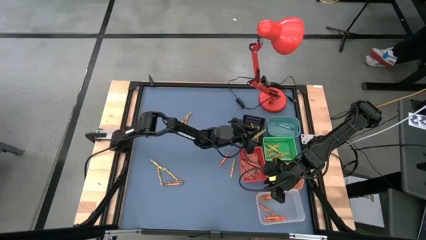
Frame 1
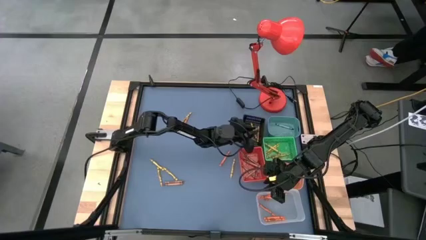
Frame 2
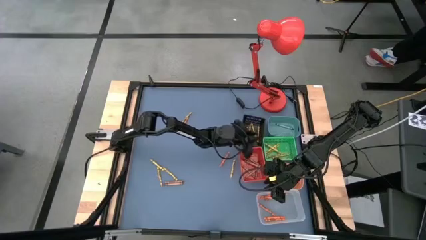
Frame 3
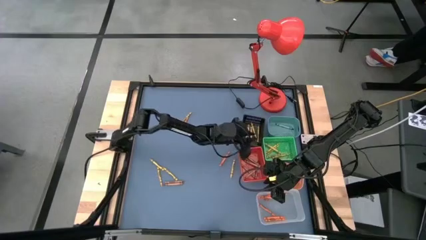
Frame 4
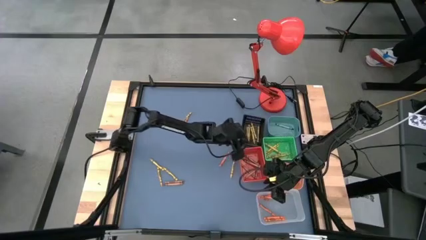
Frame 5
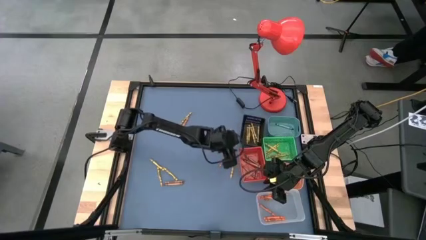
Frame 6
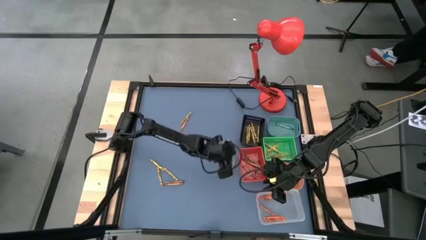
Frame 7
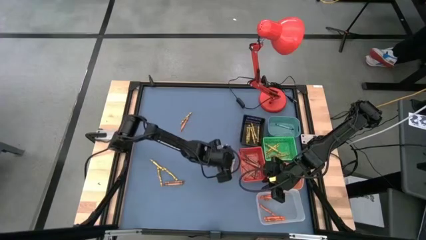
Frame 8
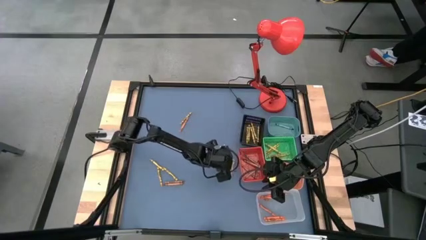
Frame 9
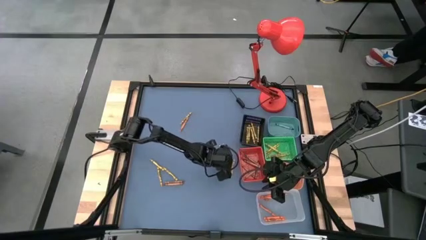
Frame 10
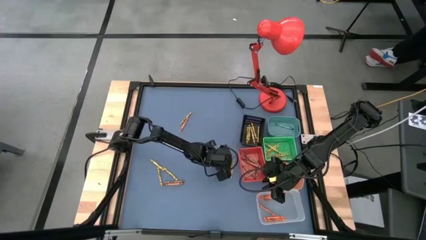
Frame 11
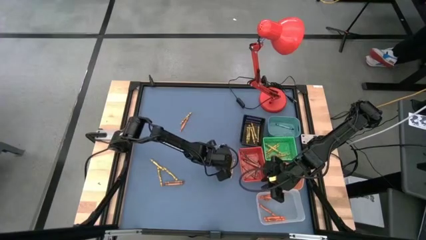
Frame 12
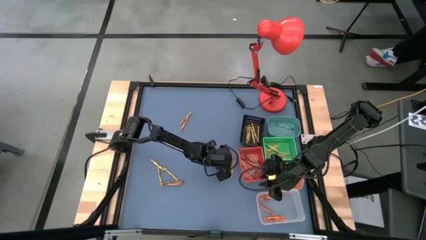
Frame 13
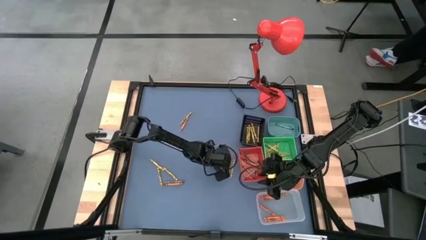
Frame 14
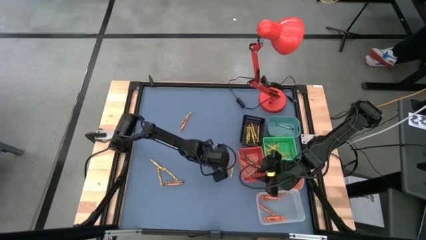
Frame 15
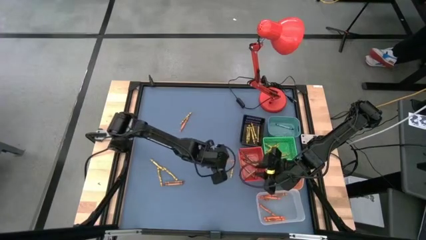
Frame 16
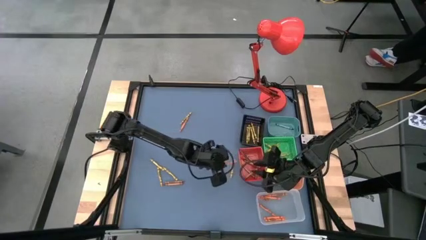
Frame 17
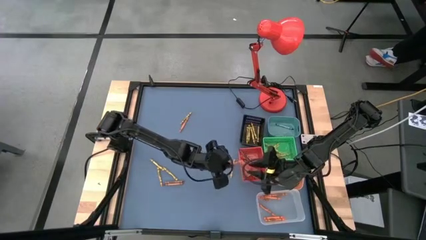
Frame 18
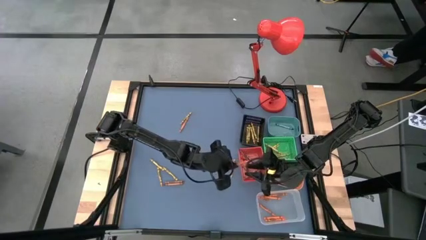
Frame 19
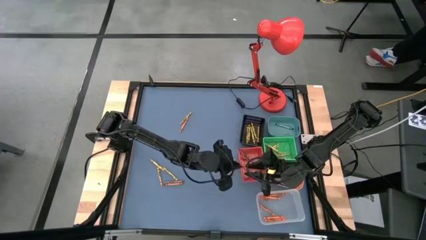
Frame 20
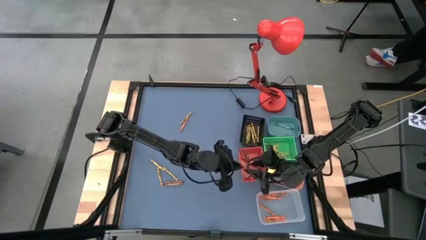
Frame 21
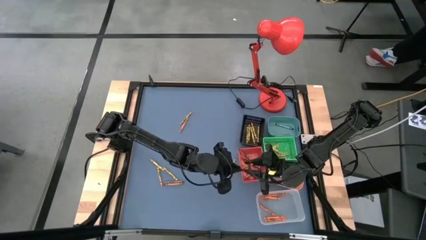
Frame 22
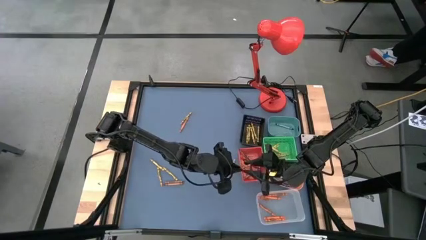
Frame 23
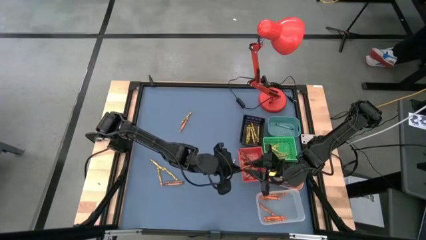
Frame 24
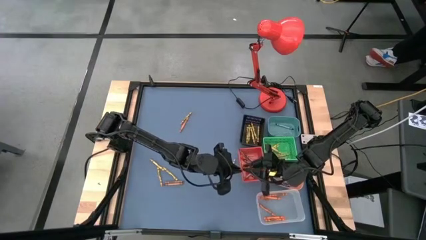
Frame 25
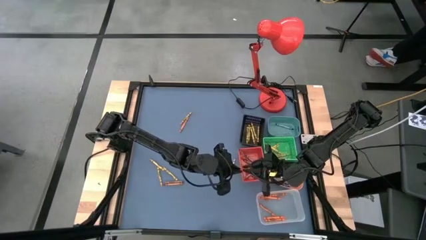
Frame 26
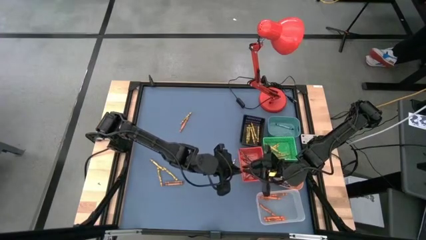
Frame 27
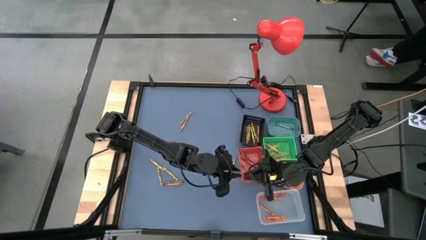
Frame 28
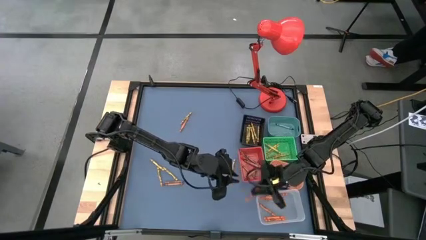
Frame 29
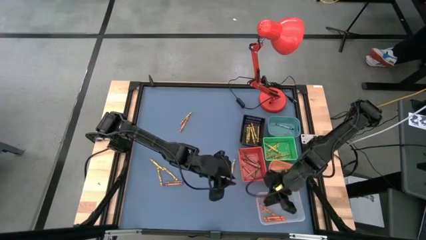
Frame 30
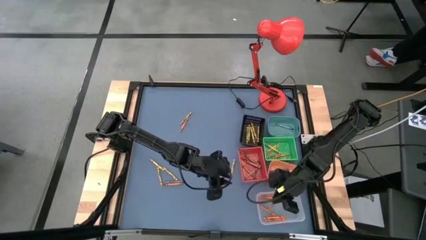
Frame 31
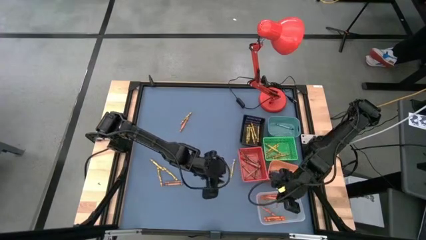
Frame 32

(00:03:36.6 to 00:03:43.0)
Task: Sort crayons
Put the orange crayon into the transparent bin

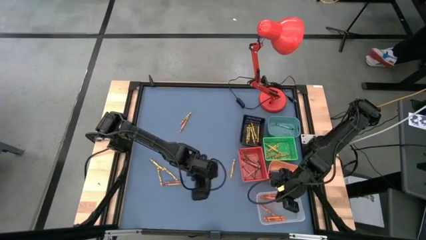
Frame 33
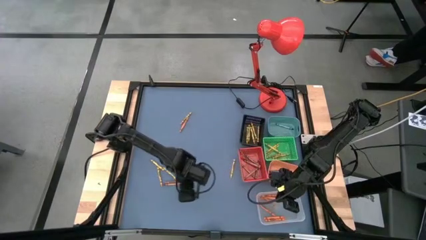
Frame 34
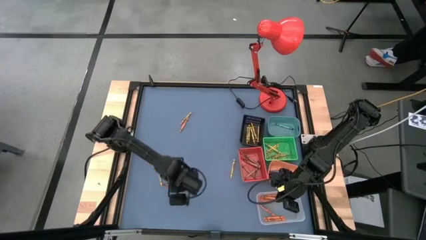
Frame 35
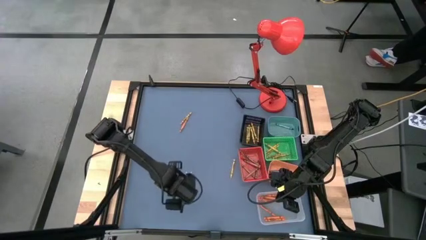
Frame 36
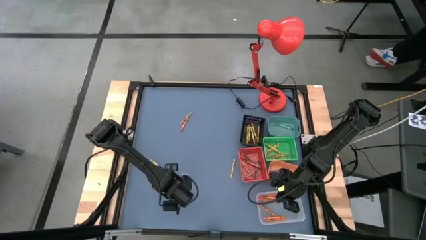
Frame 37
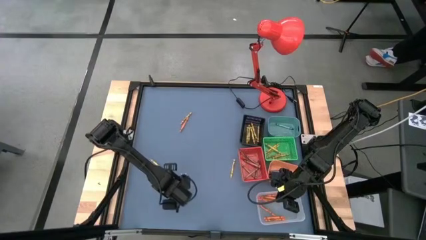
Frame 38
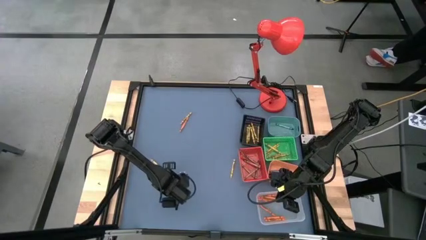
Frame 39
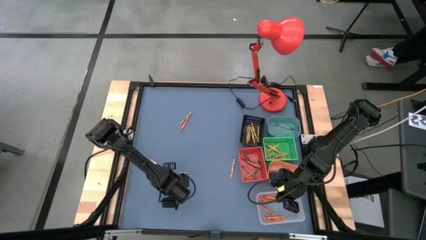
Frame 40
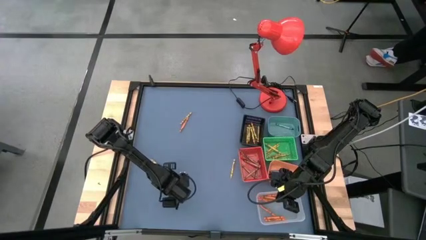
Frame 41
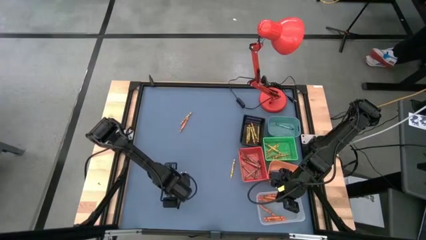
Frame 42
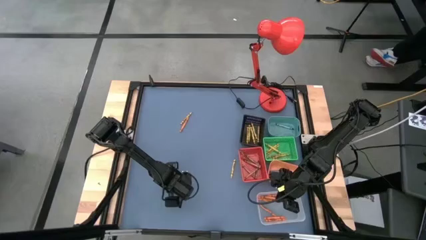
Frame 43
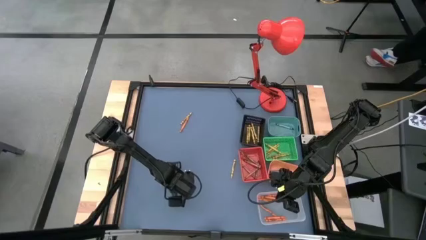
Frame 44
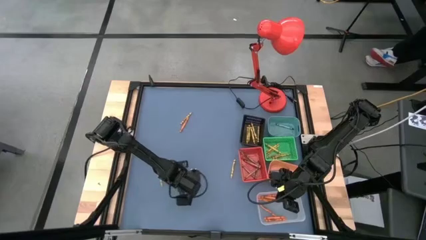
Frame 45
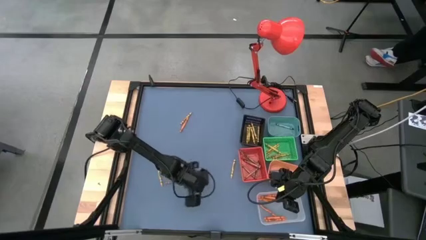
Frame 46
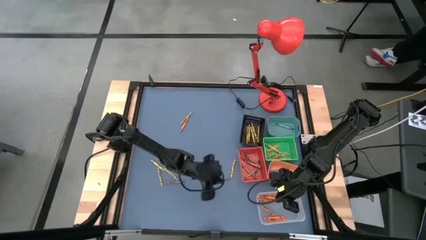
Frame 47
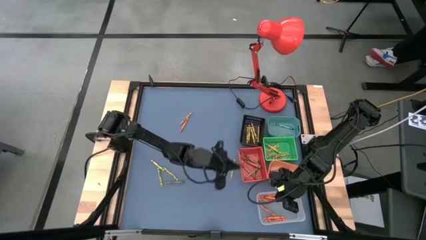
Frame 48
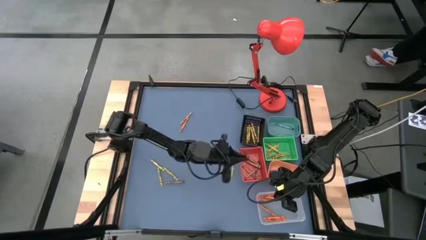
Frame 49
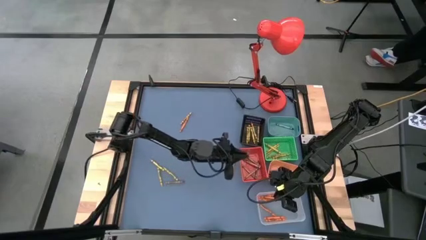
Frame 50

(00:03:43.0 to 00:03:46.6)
Put the brown crayon into the red basket

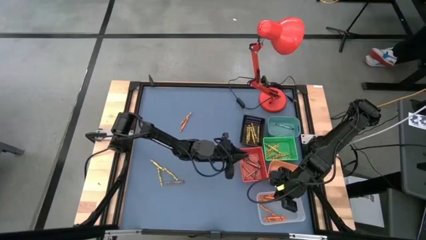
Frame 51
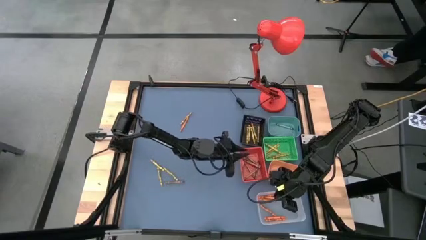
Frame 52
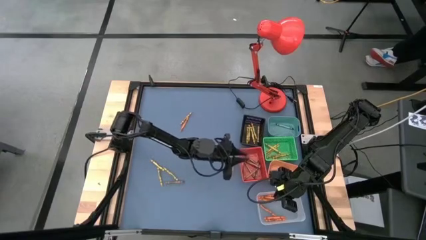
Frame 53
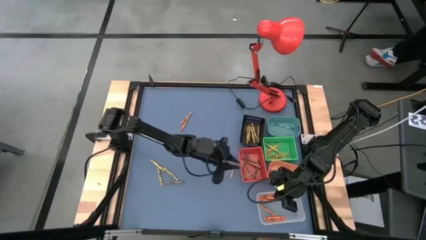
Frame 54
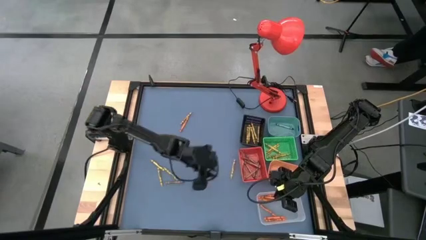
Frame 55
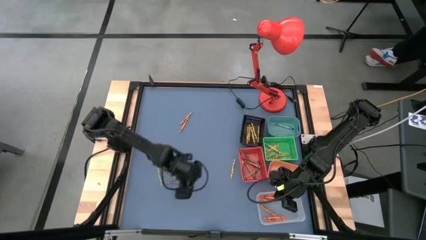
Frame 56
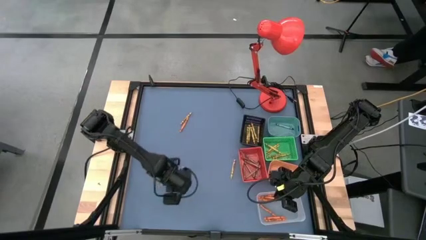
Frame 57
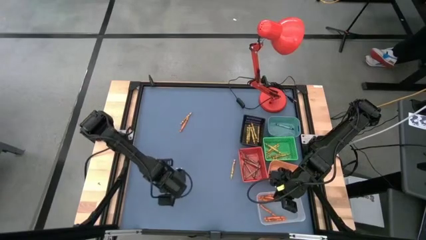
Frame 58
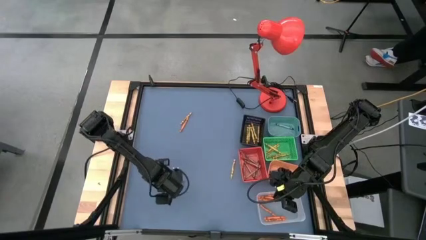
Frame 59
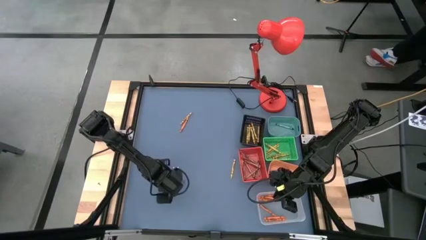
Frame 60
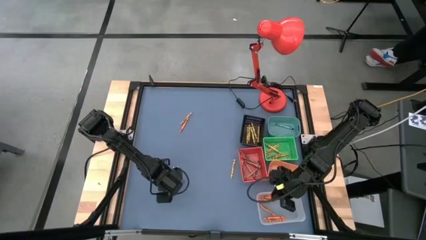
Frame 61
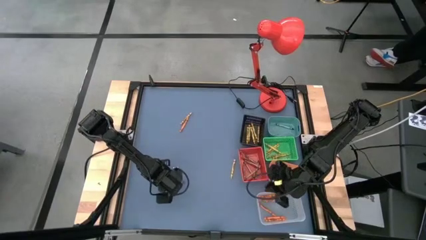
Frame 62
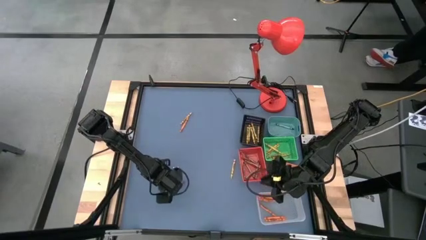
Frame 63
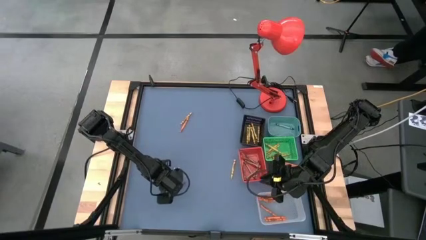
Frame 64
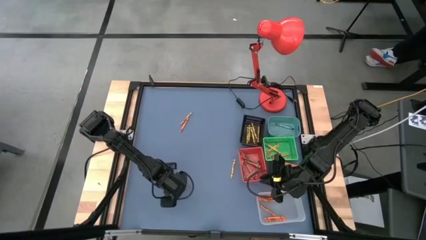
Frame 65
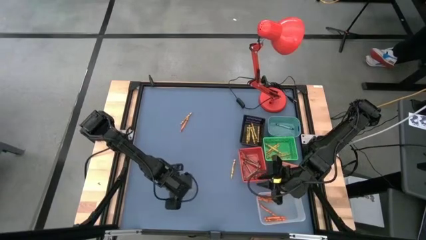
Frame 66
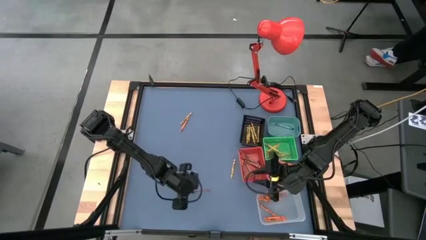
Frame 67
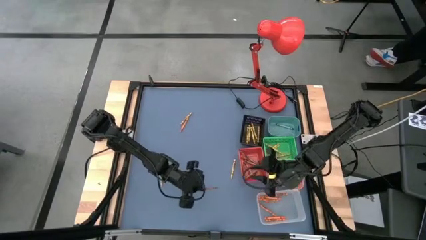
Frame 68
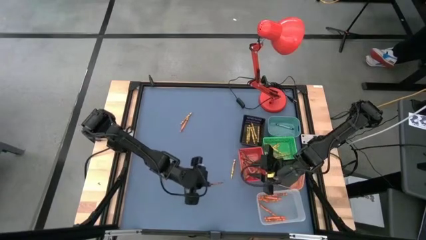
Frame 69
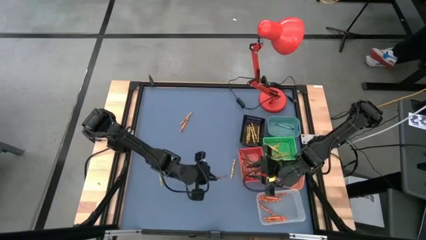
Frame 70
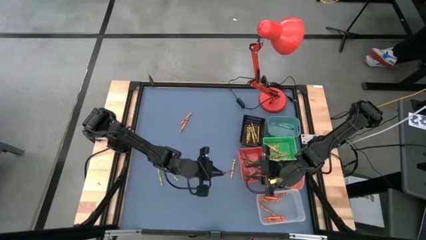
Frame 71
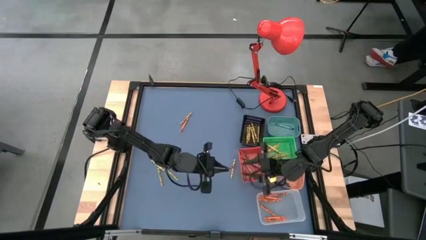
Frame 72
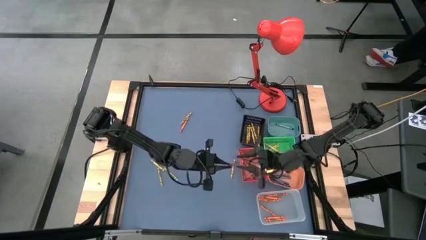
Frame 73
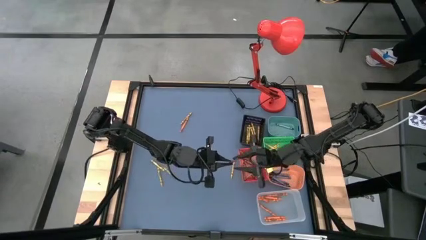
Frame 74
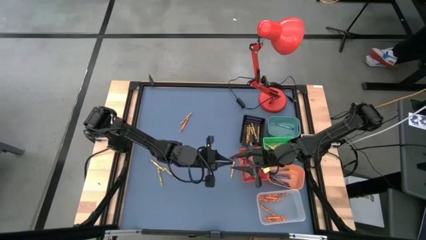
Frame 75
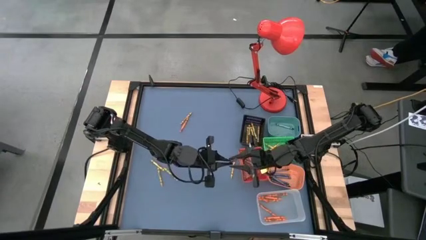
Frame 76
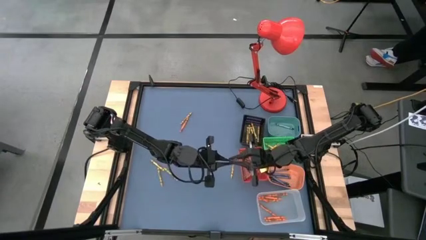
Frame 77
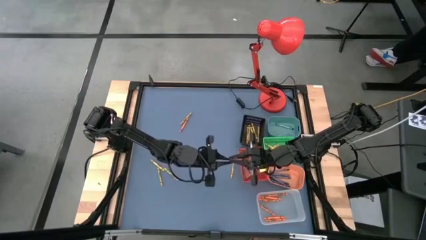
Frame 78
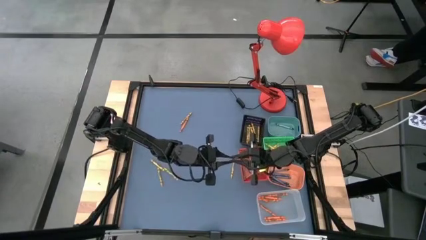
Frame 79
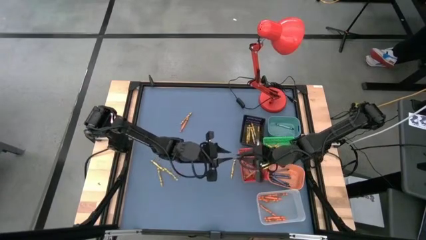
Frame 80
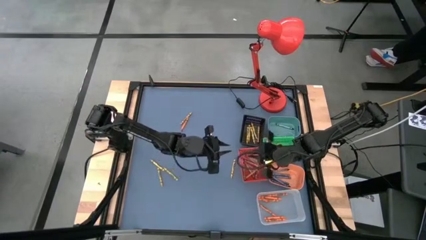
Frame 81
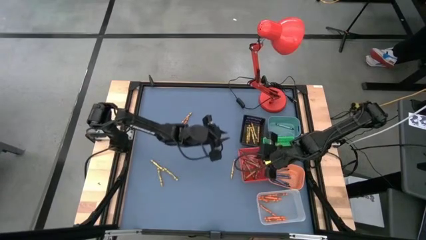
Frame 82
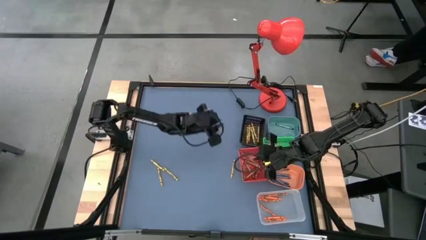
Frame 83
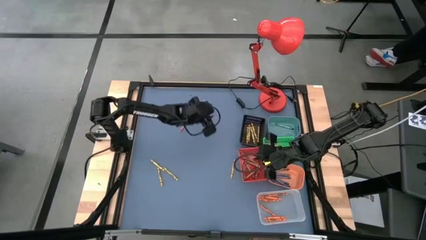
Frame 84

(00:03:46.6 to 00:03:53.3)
Put the brown crayon into the red basket
